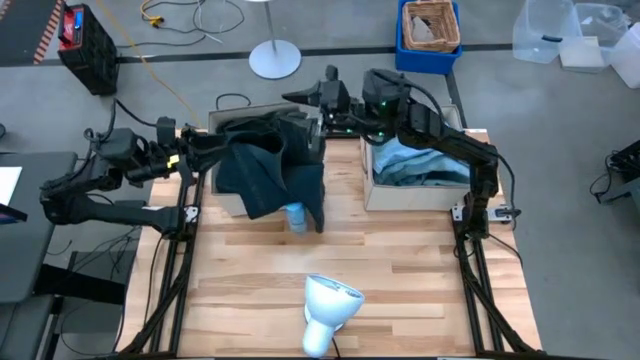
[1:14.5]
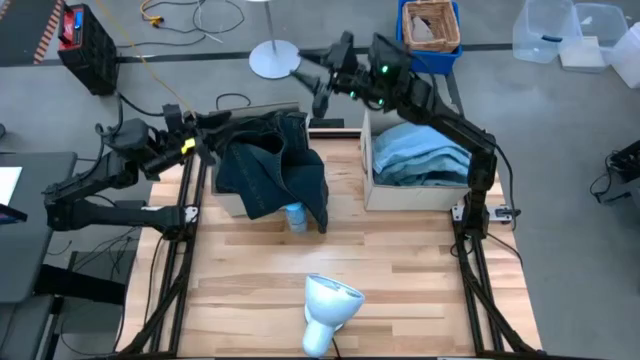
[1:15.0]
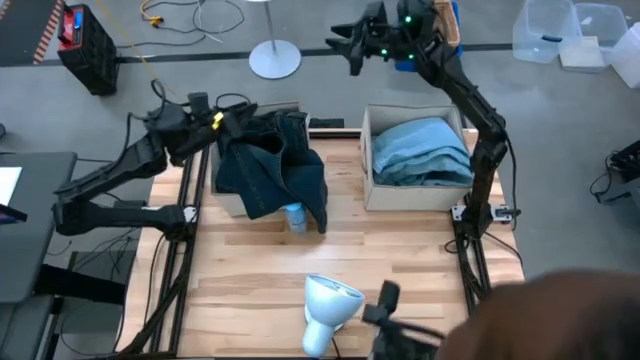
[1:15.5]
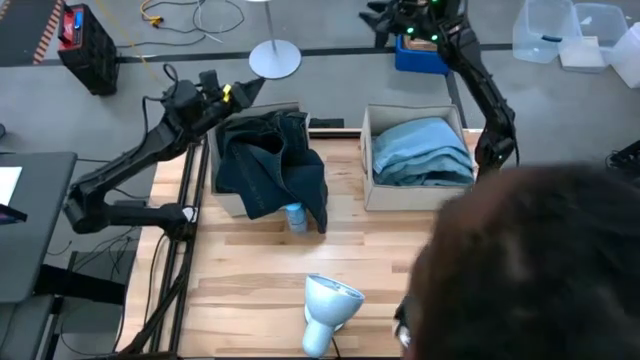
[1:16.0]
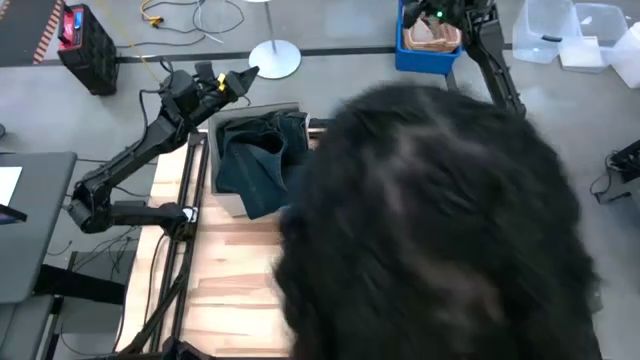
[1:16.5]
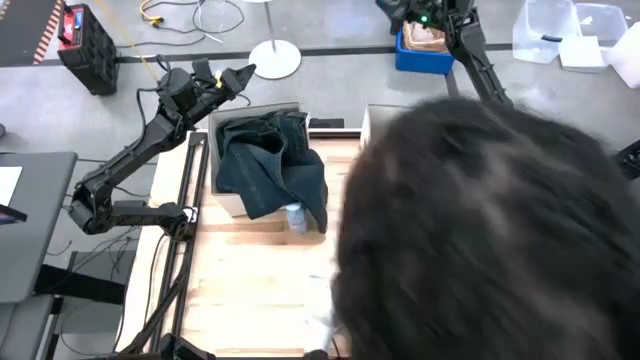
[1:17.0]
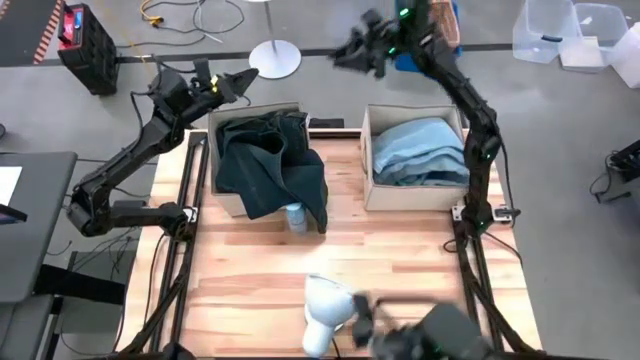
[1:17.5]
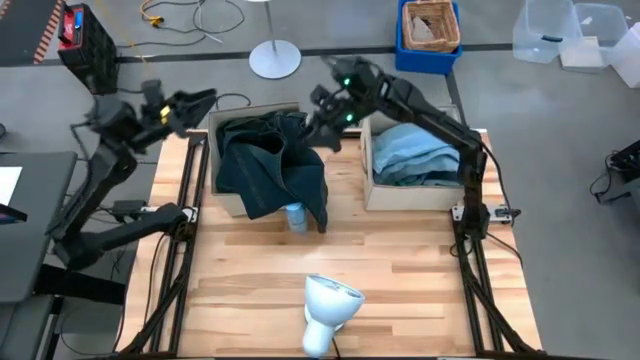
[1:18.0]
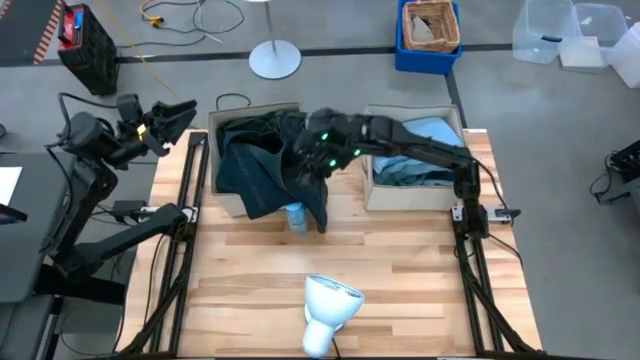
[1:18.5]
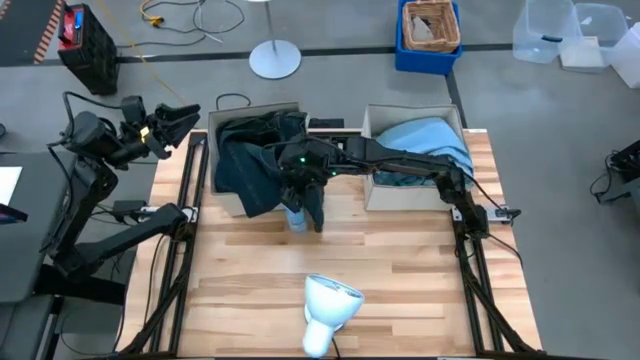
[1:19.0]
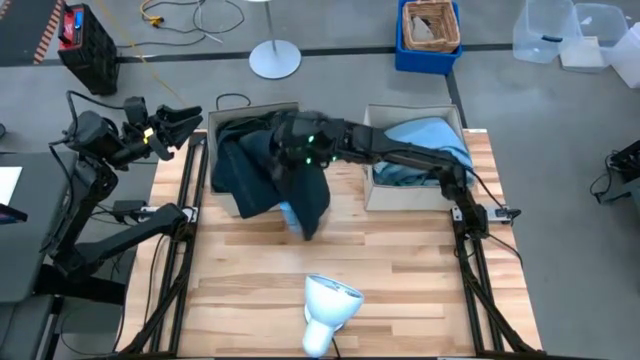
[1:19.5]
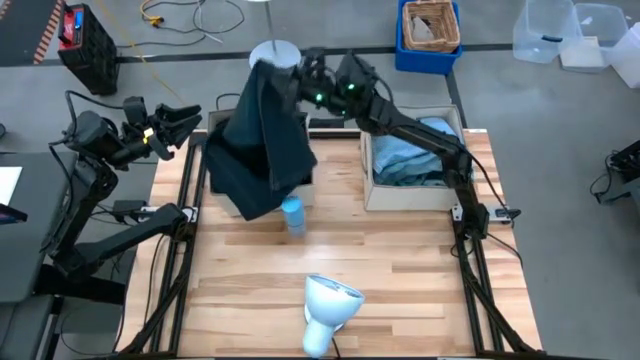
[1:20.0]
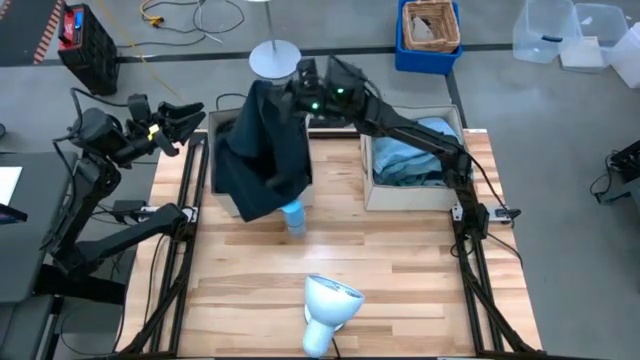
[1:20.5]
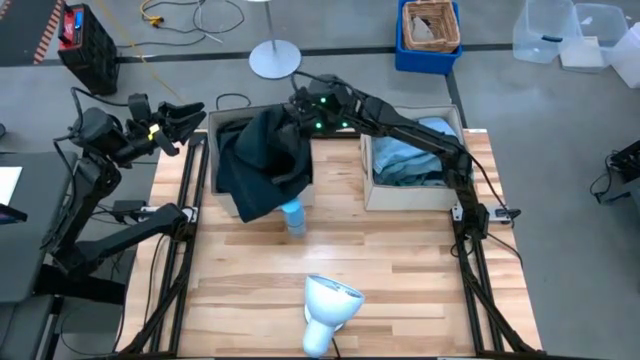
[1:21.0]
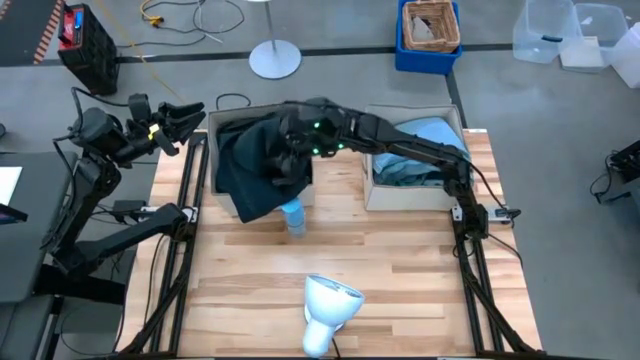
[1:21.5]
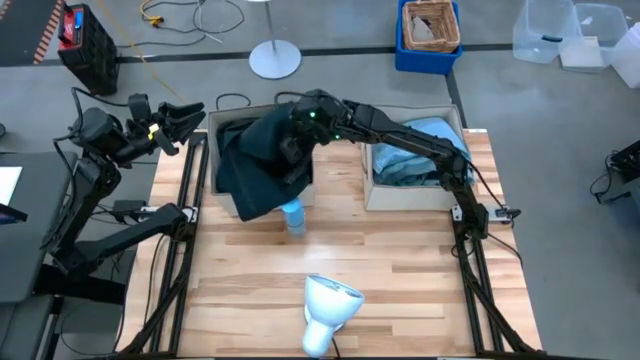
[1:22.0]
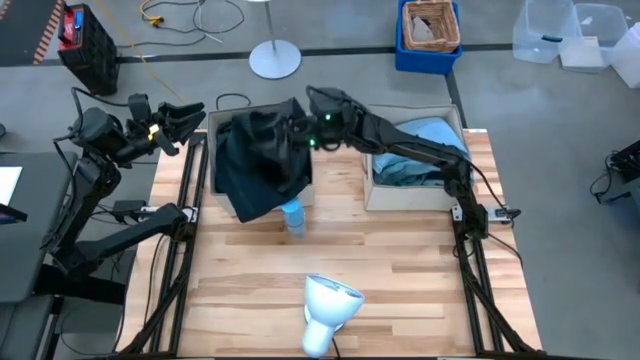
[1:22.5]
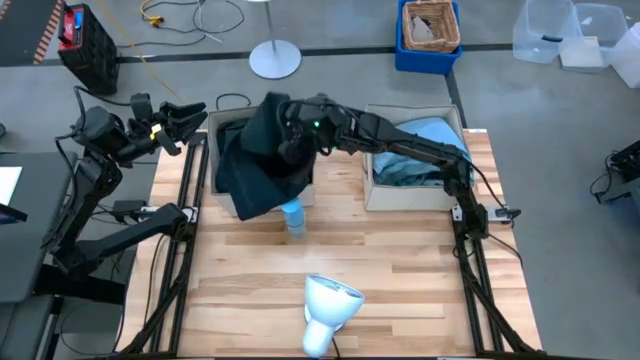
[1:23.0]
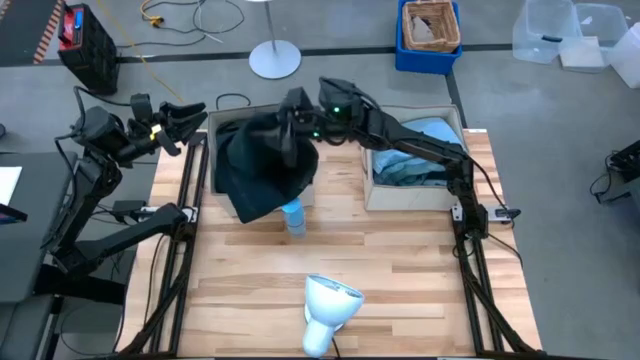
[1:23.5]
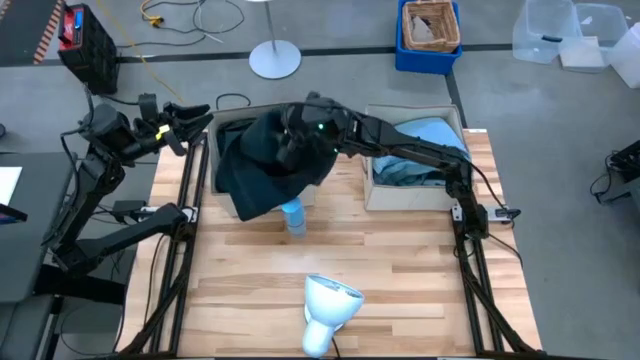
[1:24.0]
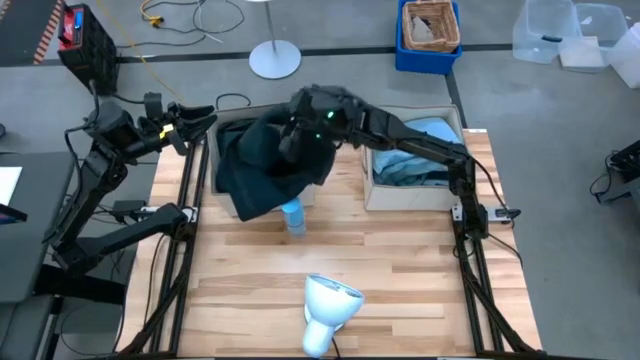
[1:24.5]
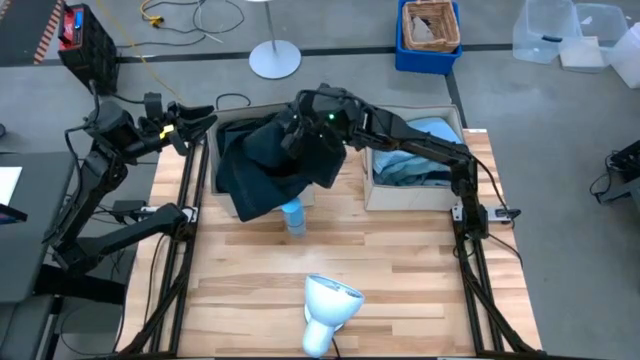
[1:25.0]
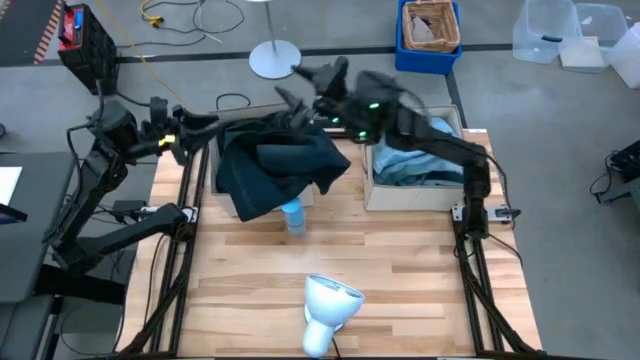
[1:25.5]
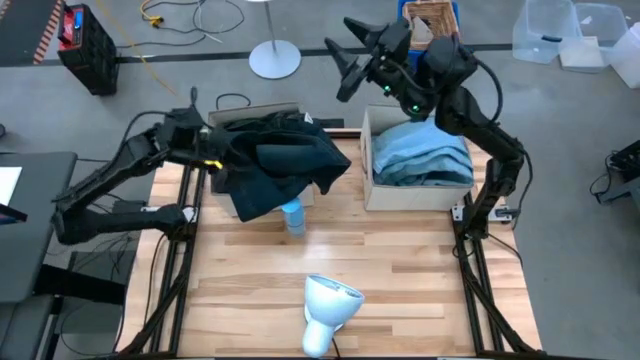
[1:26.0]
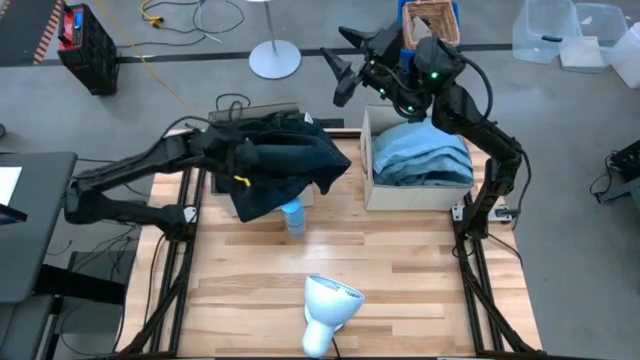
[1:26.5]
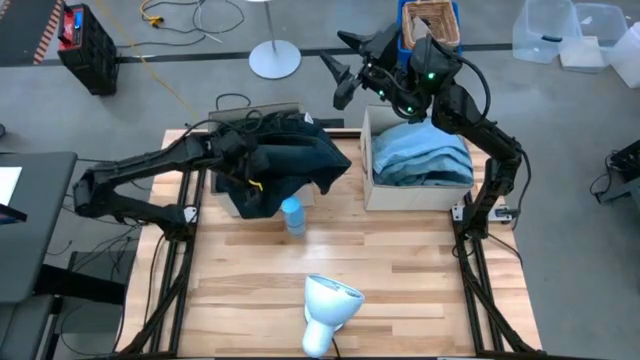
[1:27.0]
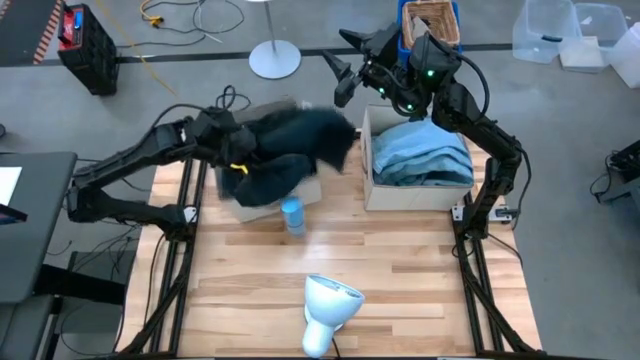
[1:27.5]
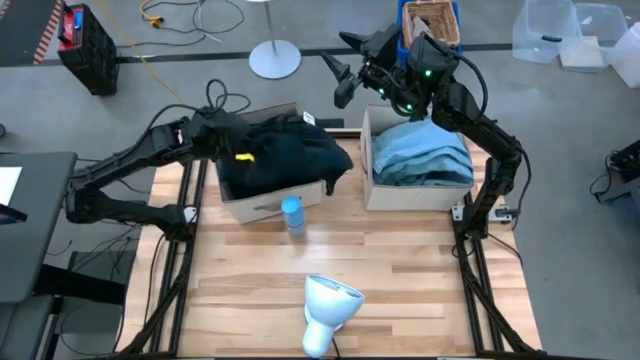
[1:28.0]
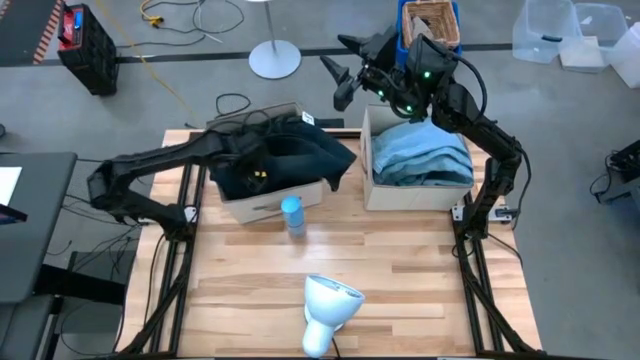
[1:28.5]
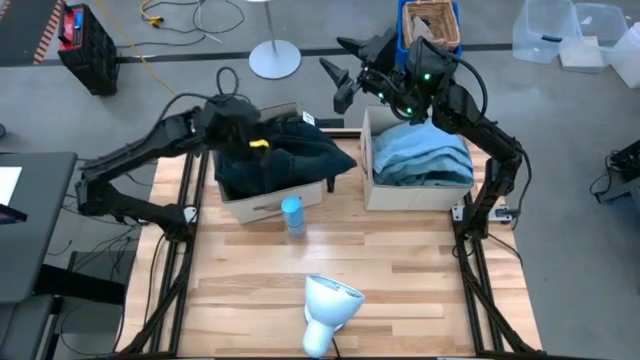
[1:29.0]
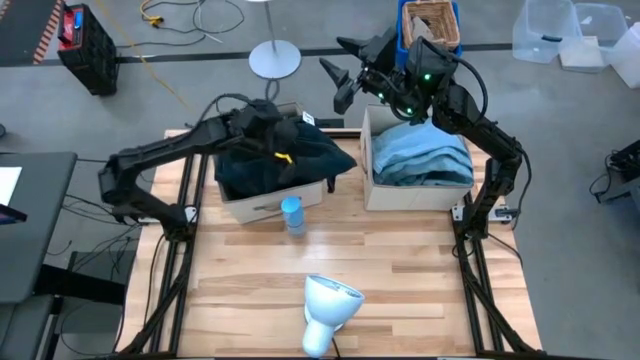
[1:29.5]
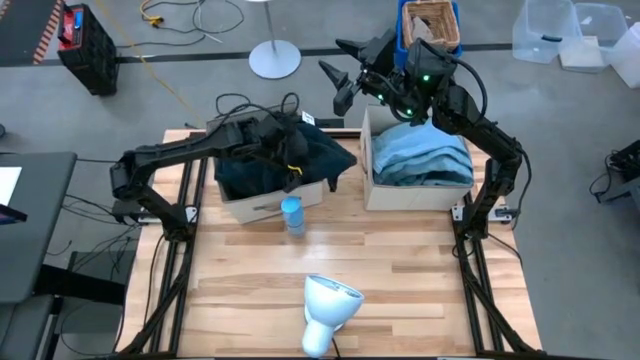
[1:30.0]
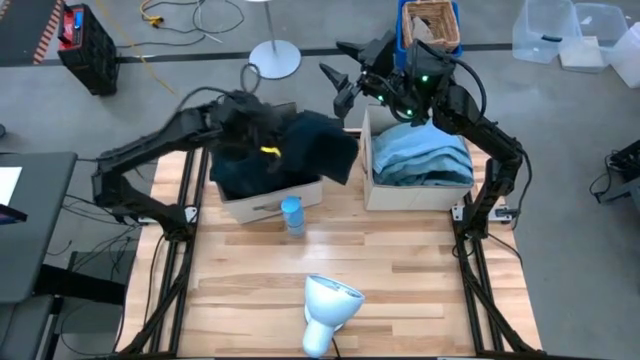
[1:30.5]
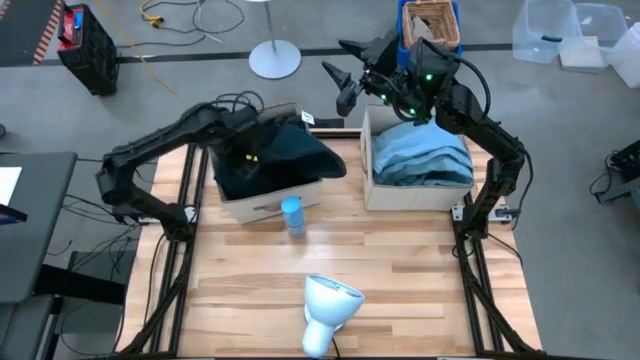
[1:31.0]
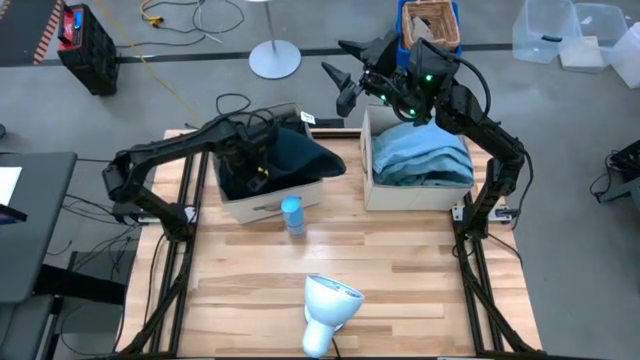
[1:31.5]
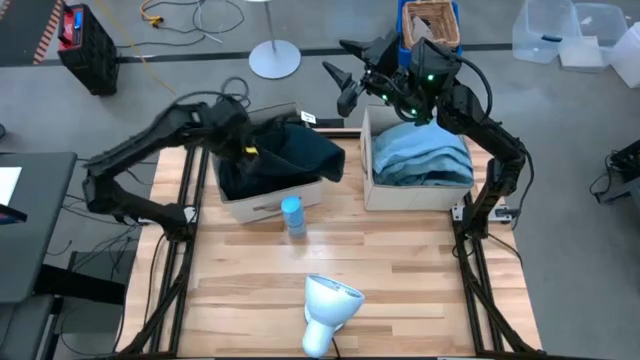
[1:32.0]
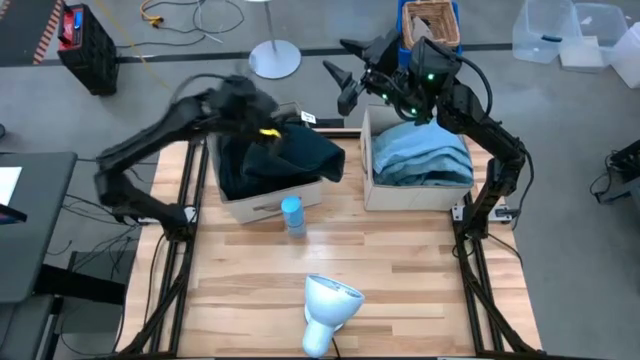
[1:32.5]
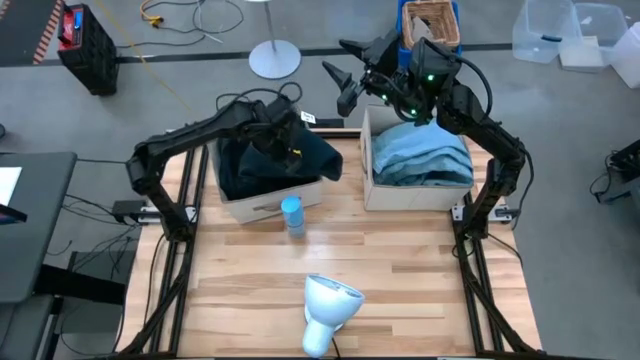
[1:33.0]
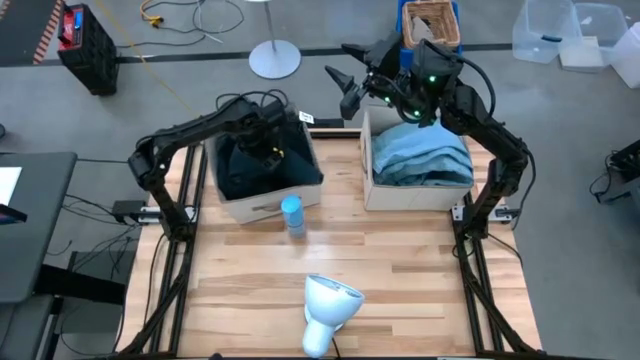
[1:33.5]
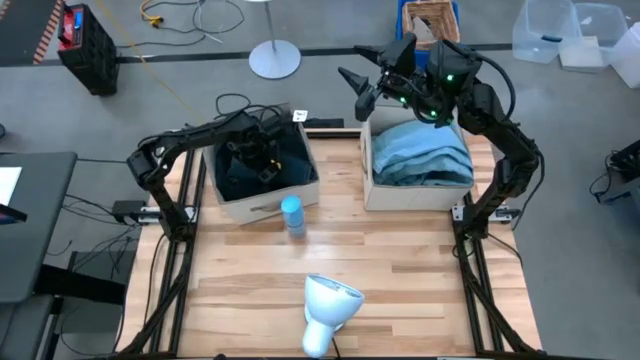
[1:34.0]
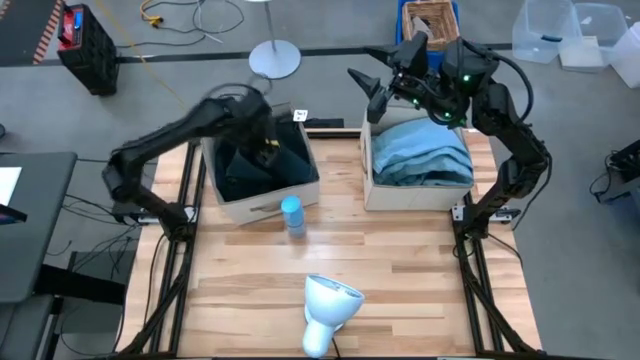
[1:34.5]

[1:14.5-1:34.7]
Task: Sort clothes
Put the dark blue pants into the left laundry organizer
